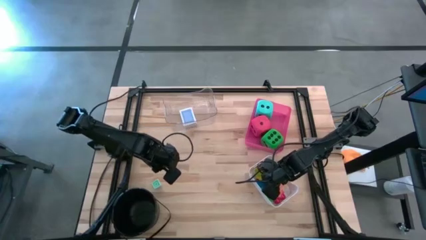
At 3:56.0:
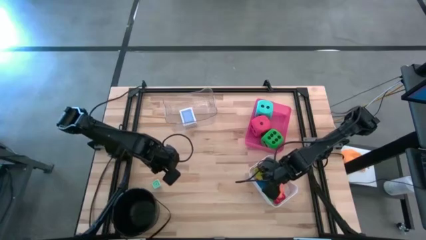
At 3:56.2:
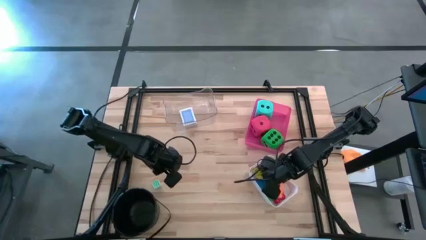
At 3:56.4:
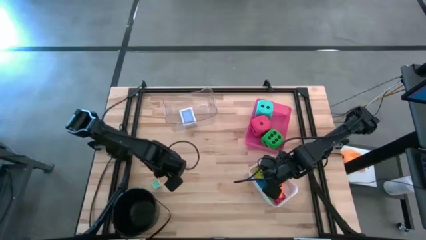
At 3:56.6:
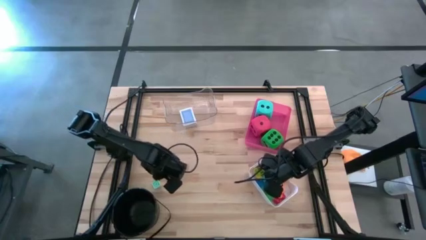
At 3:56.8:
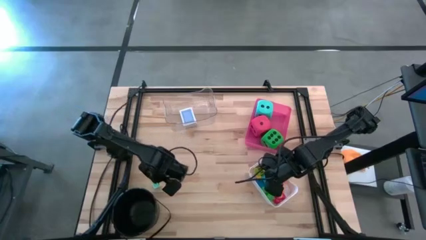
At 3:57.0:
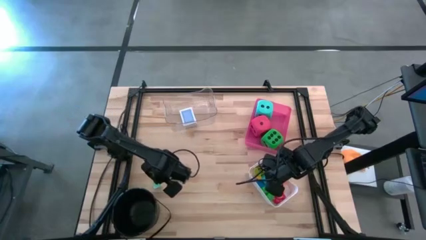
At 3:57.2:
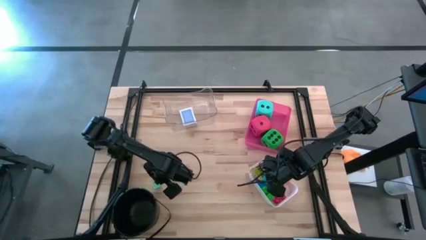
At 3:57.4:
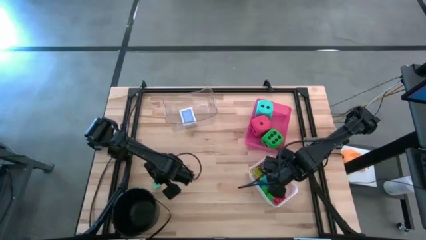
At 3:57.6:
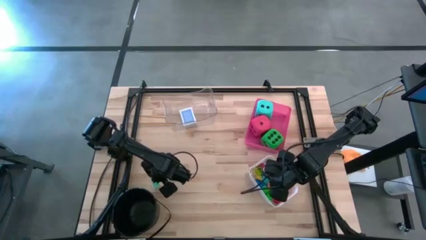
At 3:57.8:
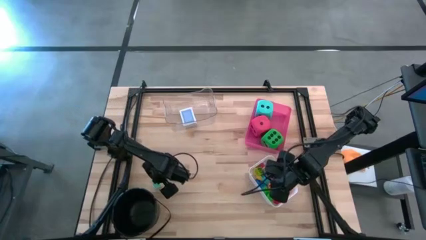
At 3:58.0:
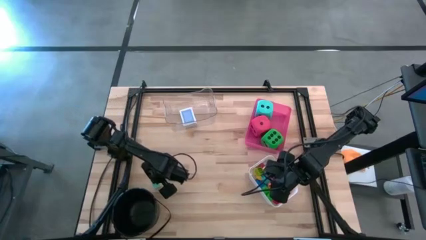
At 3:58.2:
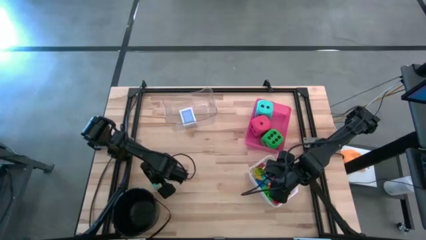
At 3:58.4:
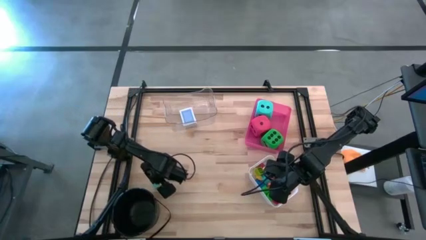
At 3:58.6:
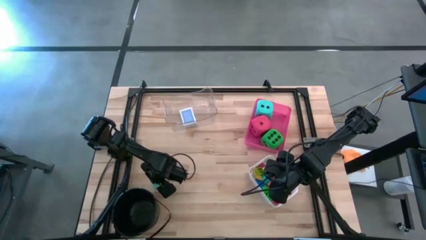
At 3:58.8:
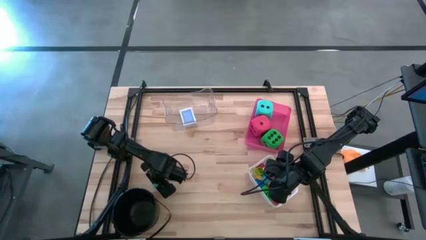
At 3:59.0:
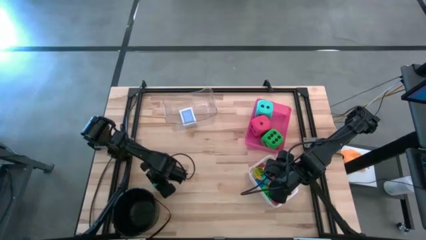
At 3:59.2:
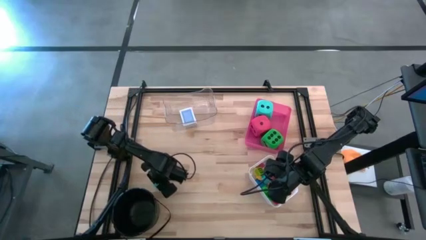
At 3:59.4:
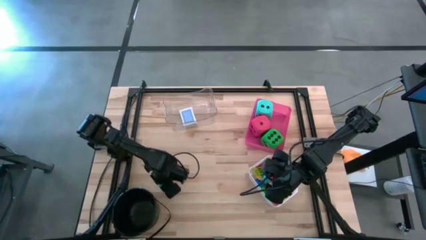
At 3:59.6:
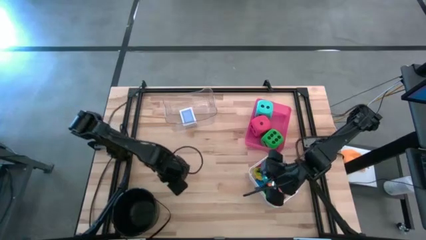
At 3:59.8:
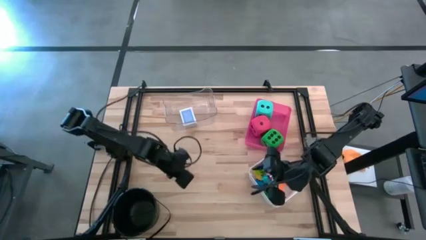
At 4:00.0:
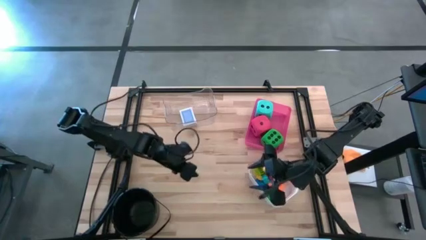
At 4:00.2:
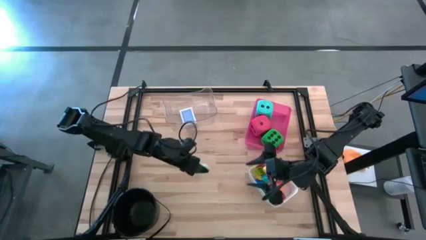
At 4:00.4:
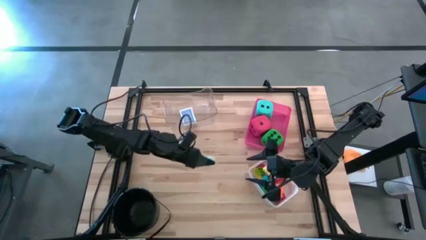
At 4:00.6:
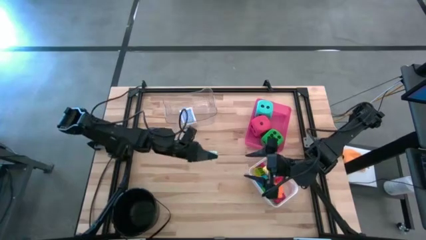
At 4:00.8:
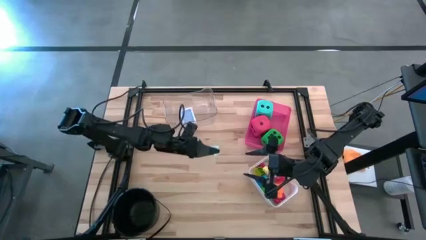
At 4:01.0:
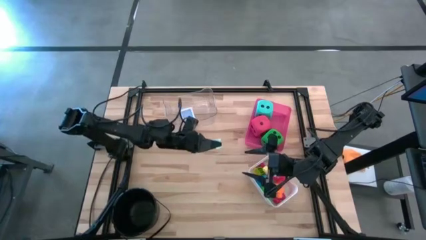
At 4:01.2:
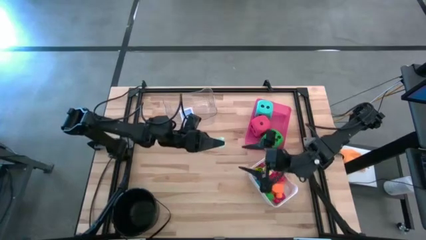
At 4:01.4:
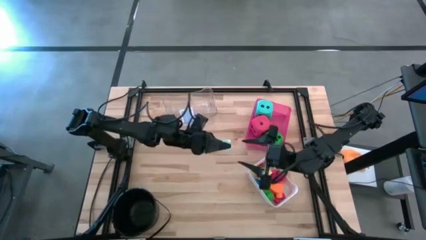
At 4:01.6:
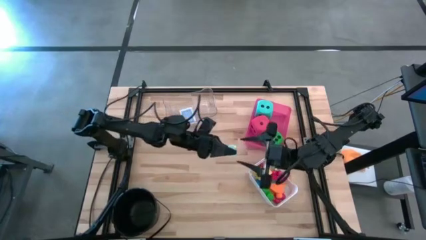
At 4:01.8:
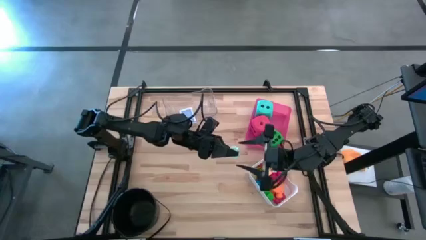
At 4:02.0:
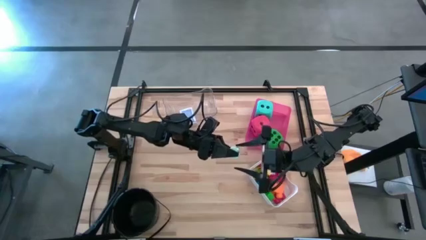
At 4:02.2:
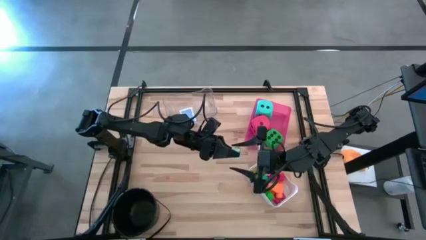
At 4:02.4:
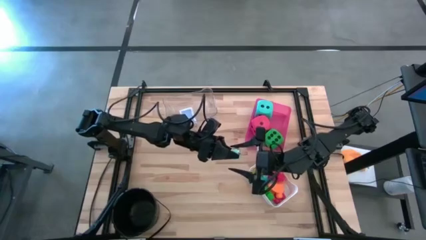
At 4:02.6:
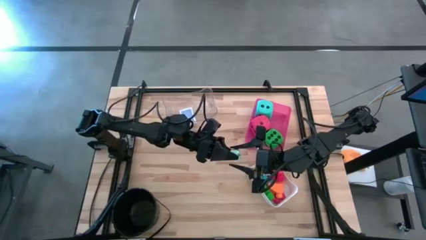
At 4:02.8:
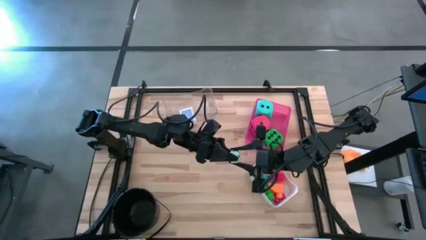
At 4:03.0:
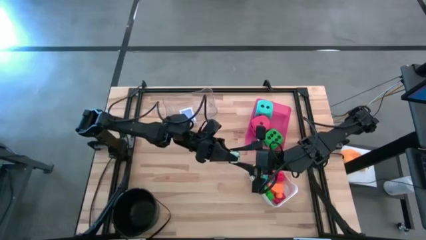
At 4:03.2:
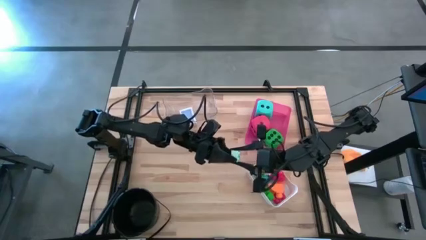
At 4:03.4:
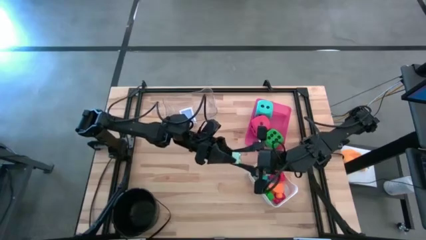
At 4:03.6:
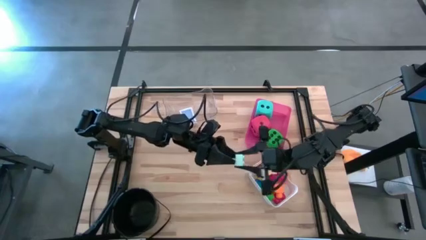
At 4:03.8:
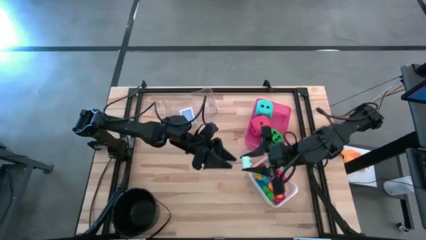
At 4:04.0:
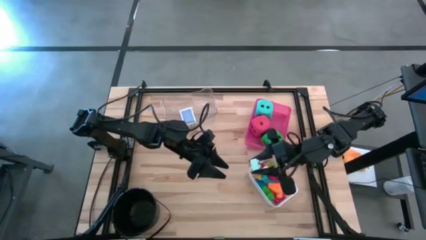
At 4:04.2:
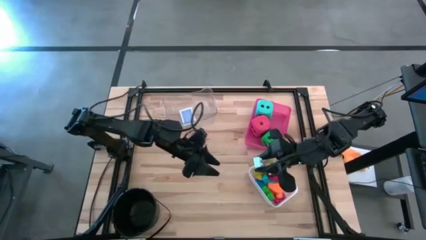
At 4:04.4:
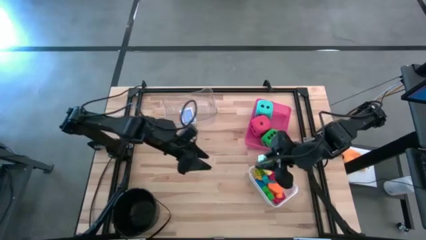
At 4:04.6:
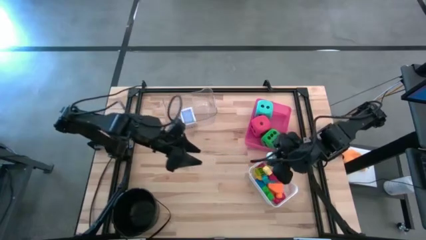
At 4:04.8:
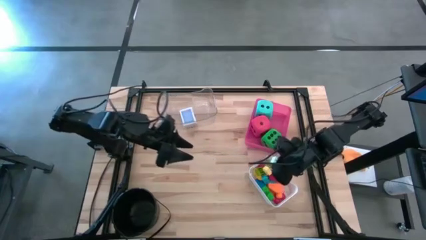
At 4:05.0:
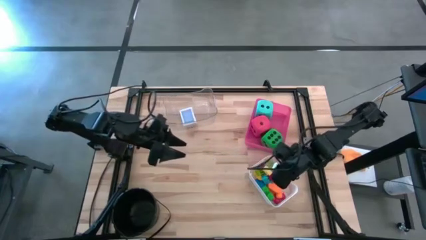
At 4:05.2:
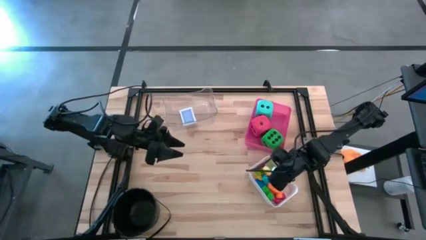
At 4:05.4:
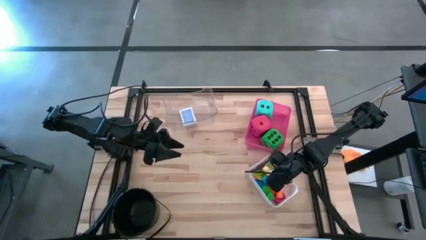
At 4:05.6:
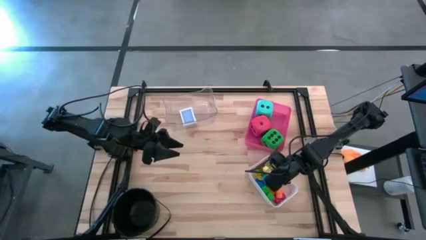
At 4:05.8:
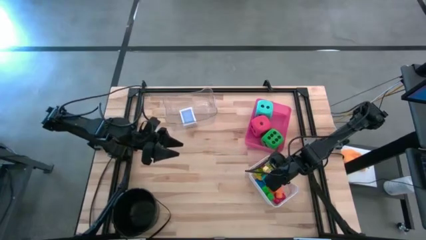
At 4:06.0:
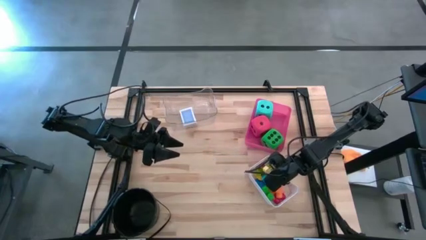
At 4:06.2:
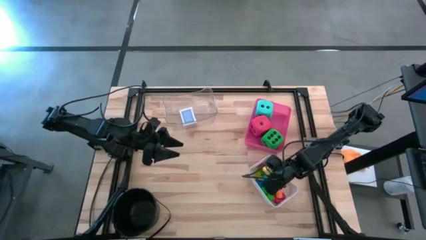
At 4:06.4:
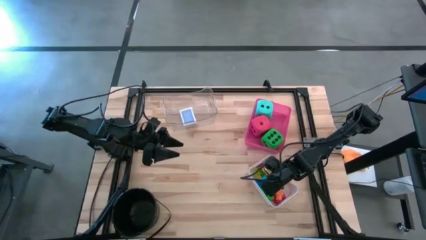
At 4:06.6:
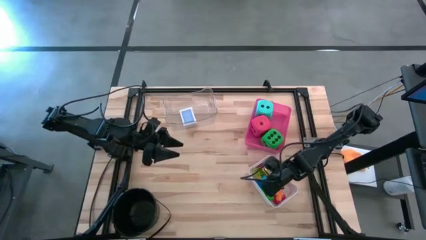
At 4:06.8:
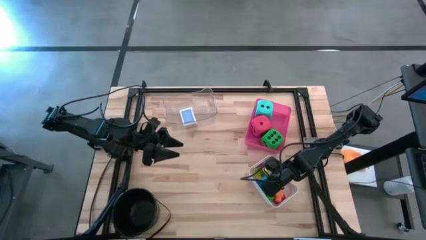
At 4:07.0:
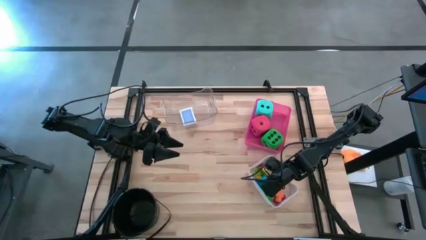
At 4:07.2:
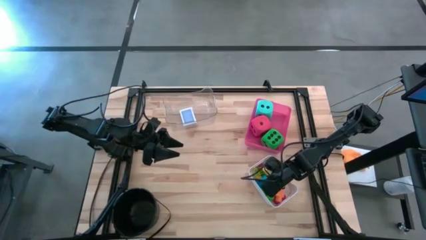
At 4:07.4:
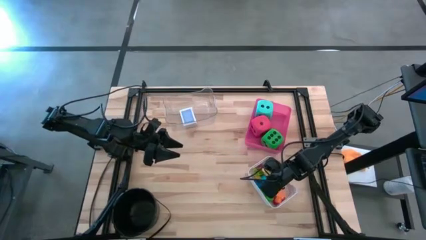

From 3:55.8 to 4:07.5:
Task: Pick & Place Toys
Put the light blue game piece into the white bin
